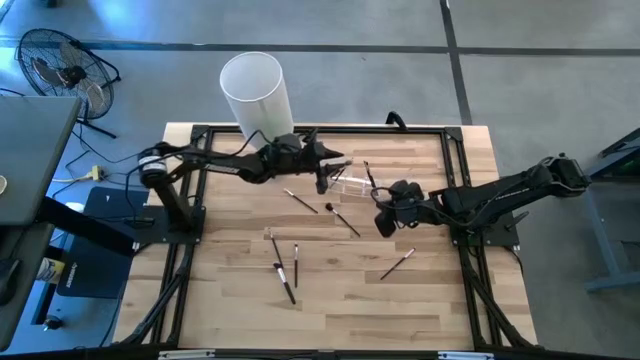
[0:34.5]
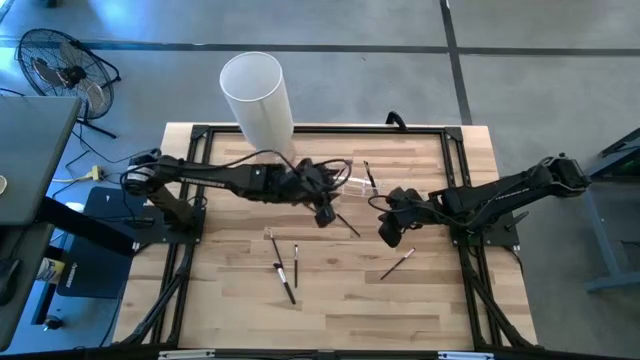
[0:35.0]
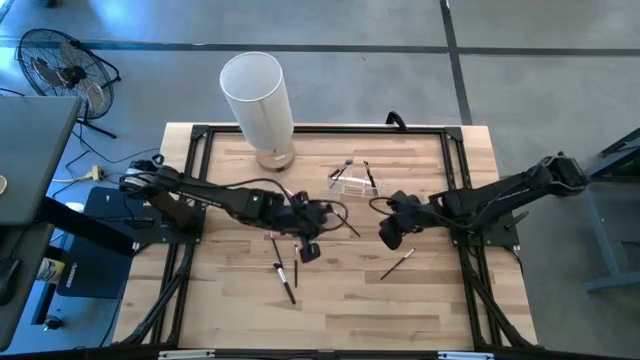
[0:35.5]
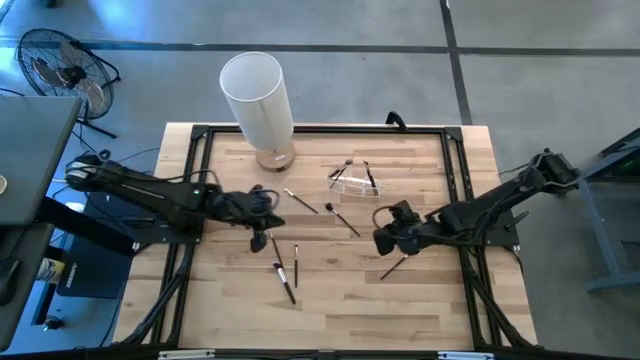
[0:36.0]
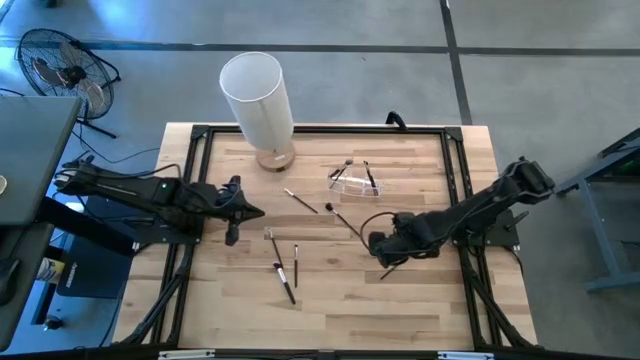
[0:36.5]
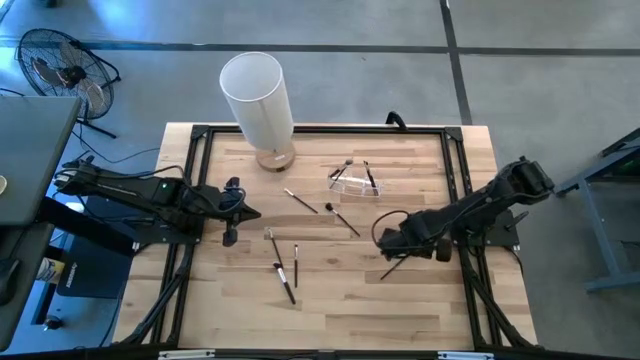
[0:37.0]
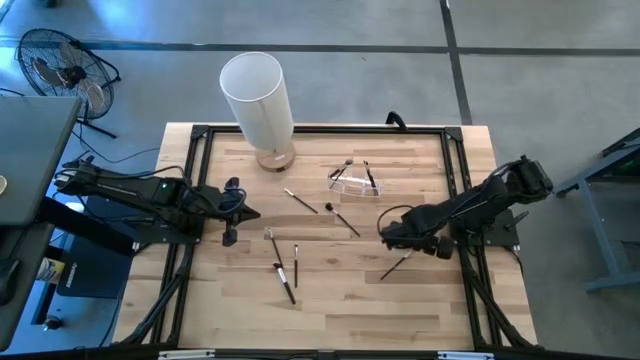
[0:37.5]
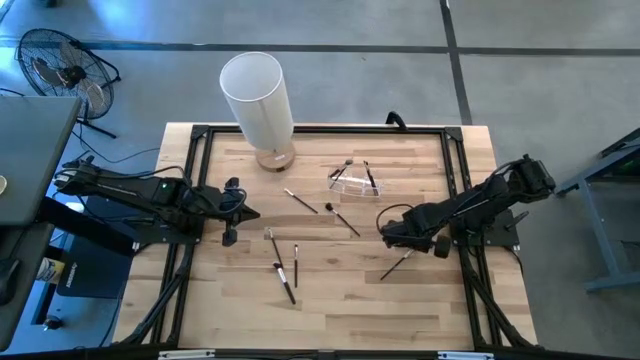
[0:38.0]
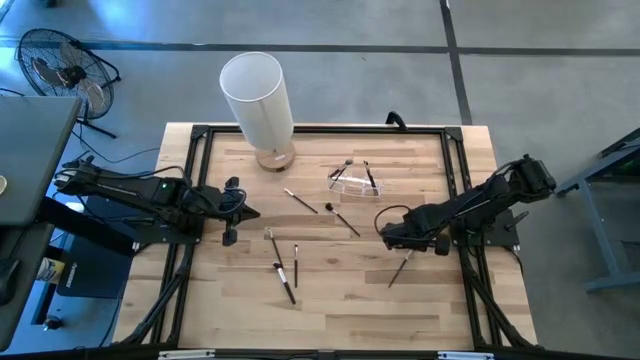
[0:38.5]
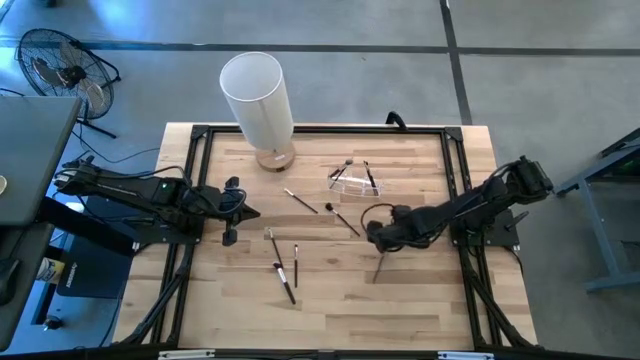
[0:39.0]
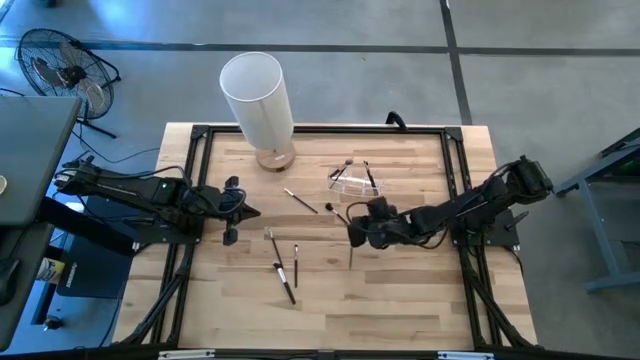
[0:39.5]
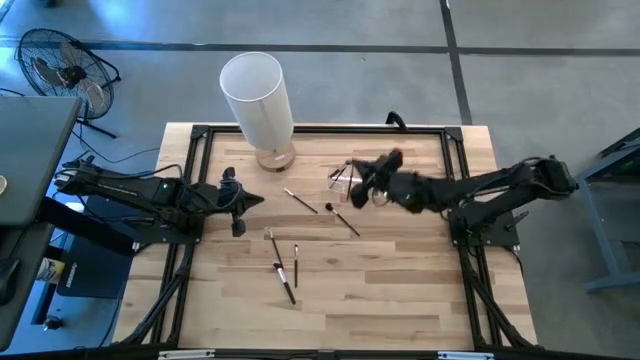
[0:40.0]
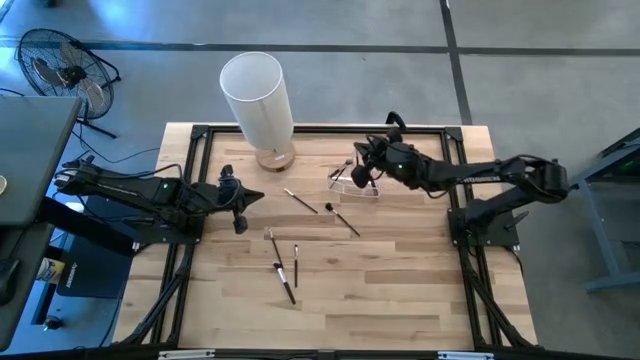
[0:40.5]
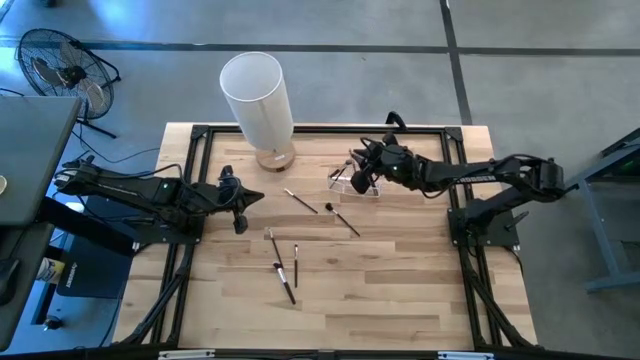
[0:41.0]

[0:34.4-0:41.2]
Task: Put items in baskets/containers
Put the black eyeshadow brush into the transparent organizer

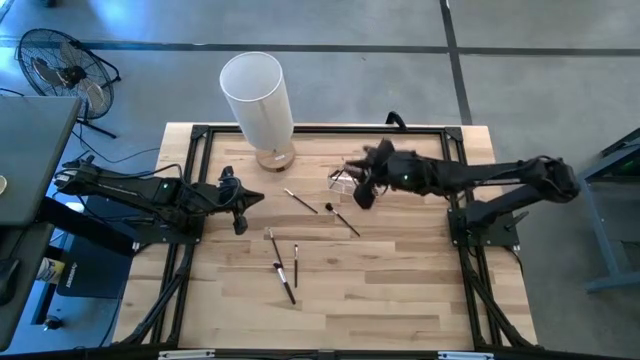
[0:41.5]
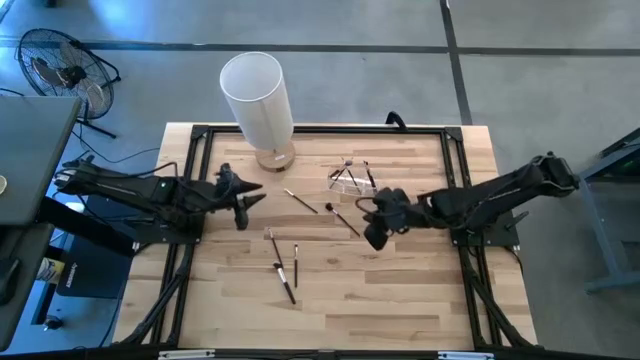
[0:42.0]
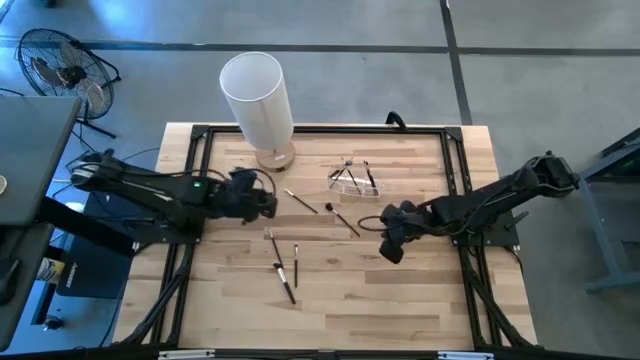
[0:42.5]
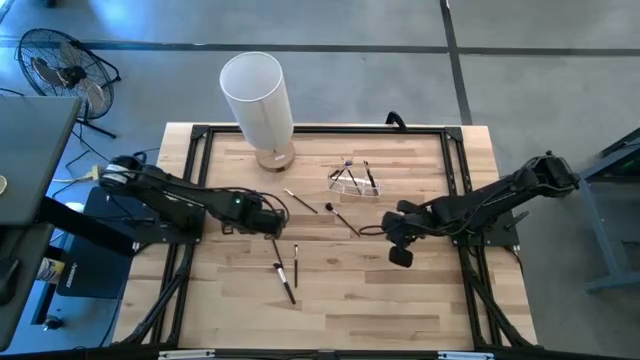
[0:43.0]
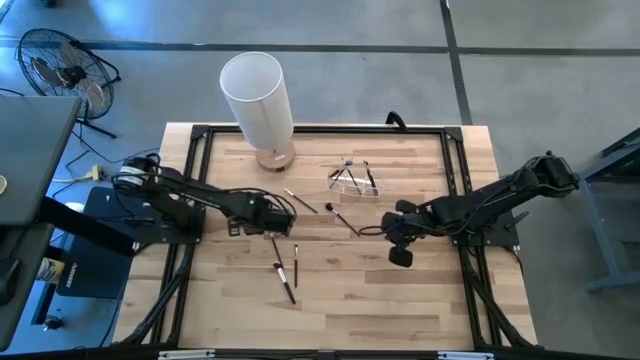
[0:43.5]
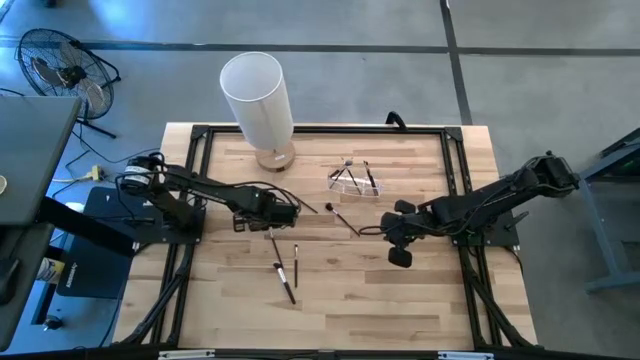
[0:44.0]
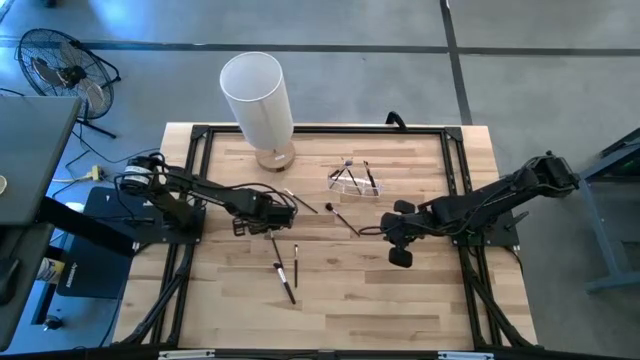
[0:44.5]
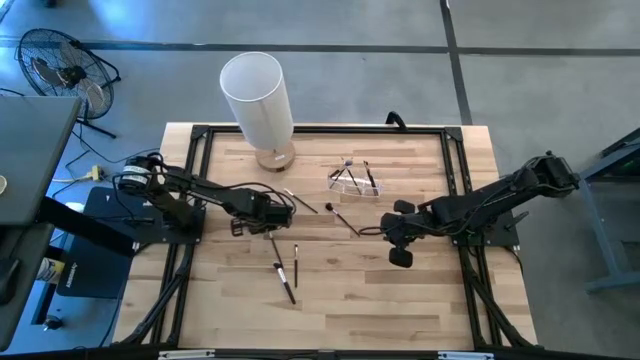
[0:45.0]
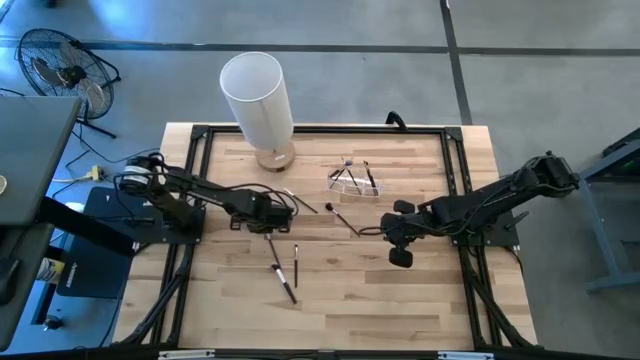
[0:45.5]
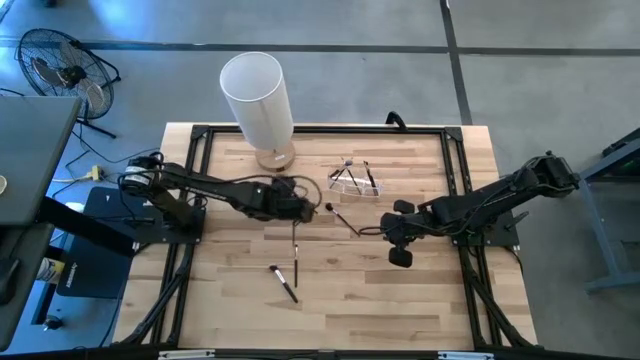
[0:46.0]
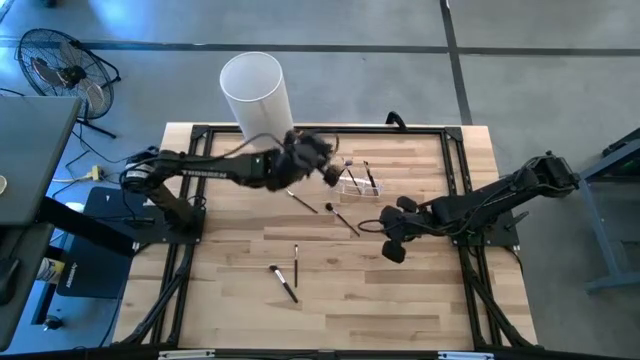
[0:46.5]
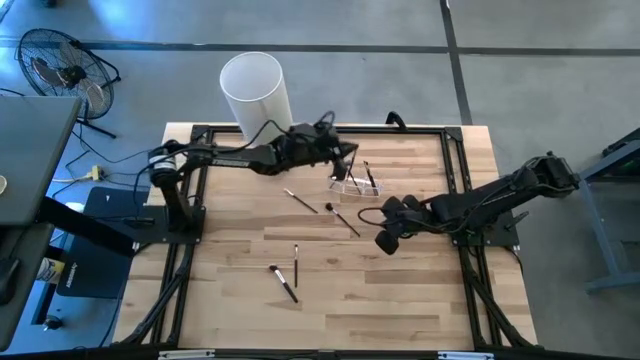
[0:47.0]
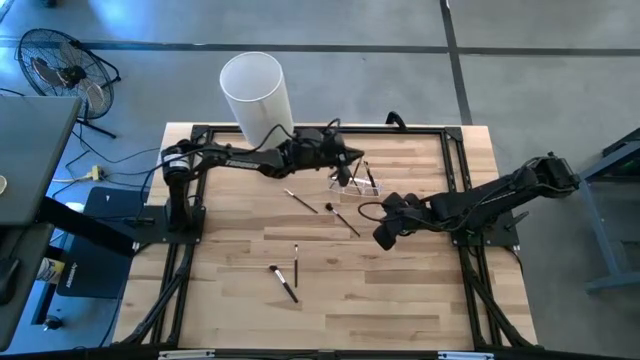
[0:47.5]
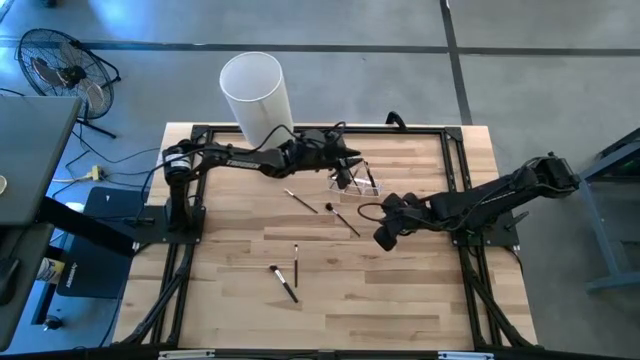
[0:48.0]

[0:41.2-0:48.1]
Put the black eyeshadow brush into the transparent organizer

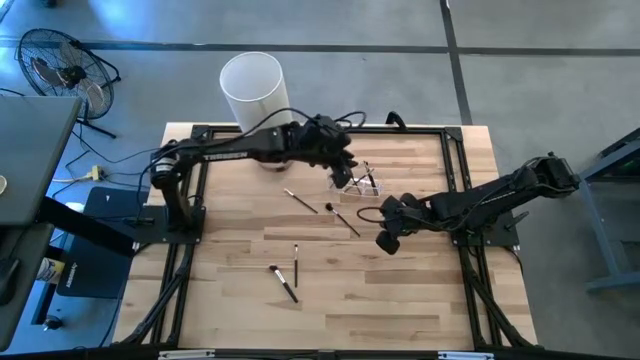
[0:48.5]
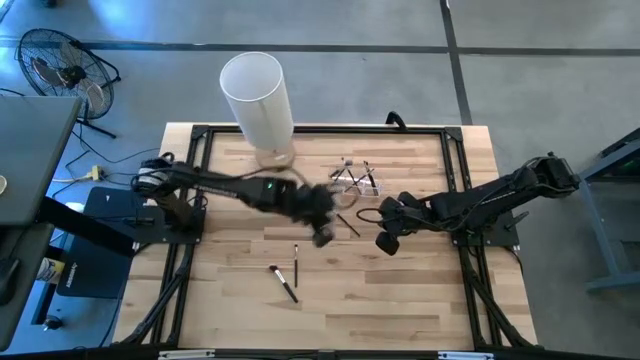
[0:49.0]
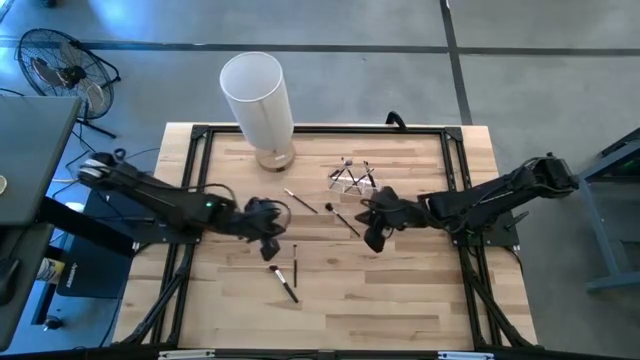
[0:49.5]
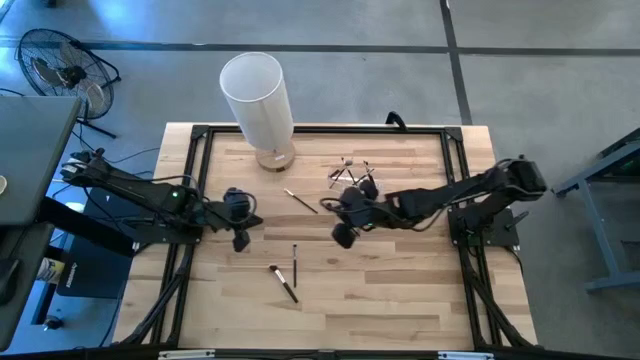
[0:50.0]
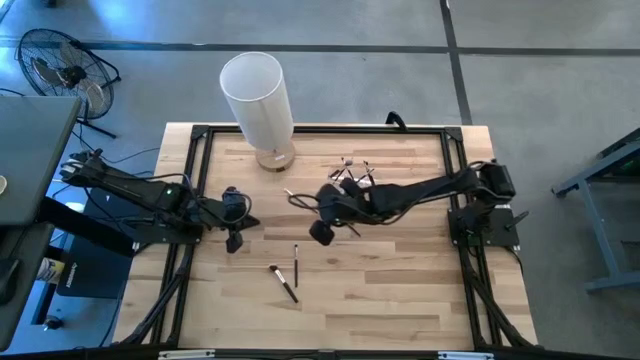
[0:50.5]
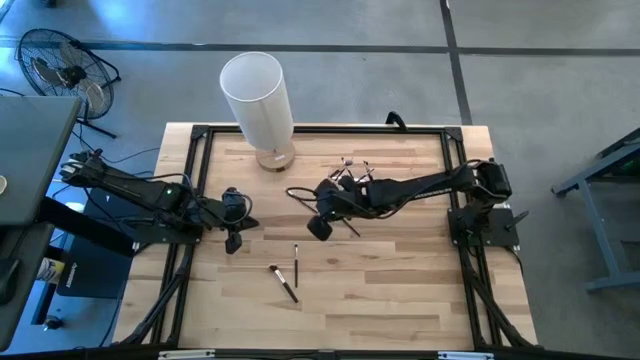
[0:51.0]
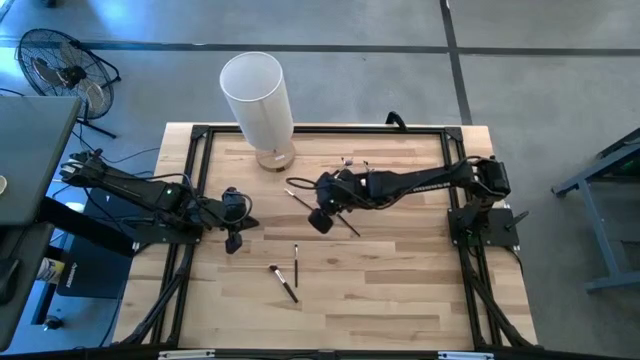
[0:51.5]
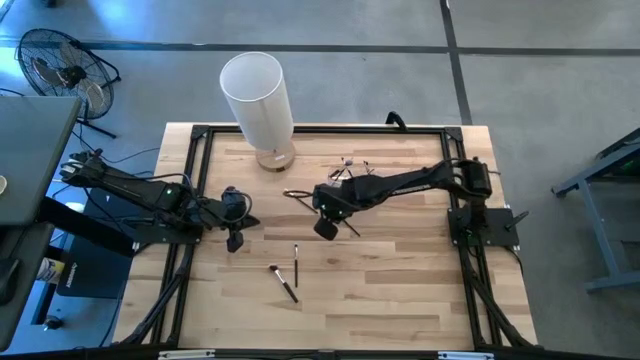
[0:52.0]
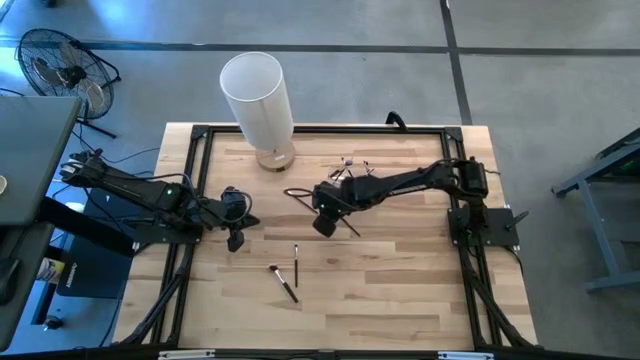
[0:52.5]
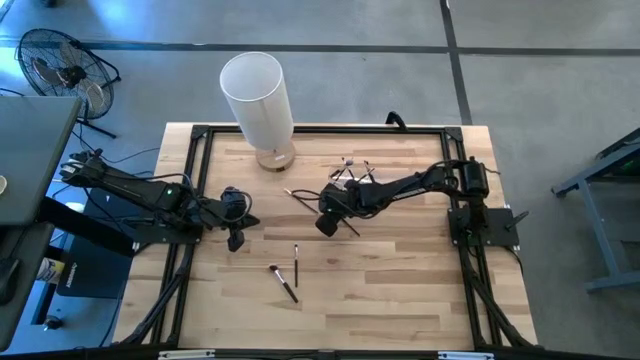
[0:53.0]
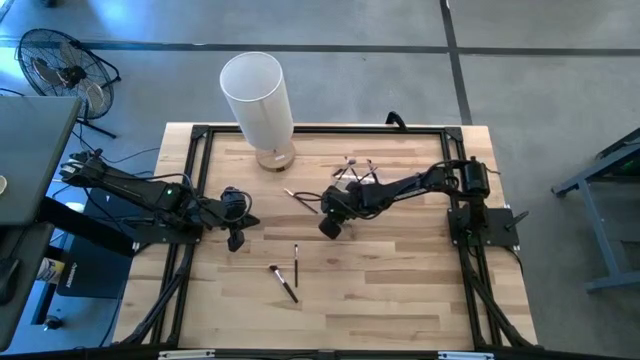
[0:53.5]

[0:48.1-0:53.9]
Put the black eye groomer brush into the transparent organizer

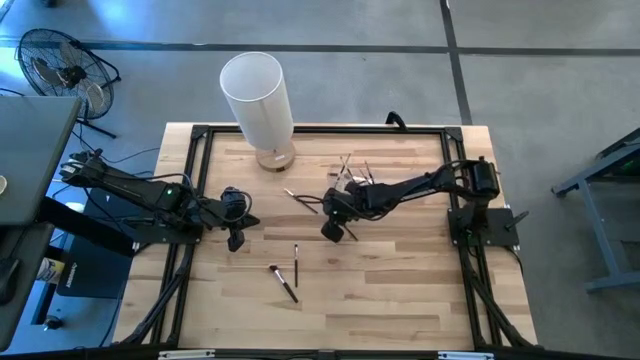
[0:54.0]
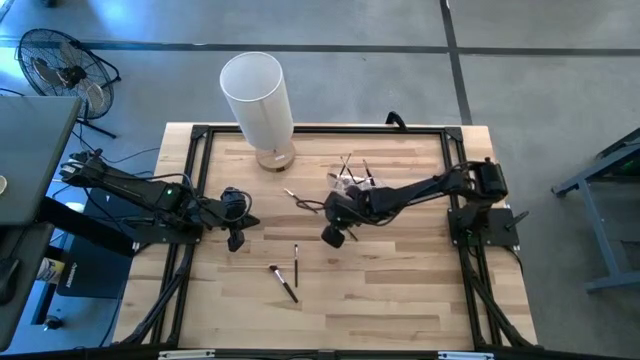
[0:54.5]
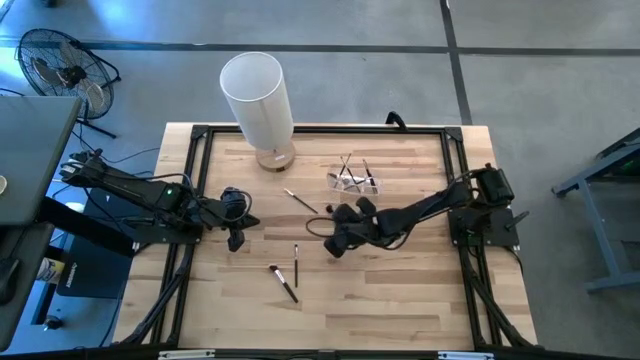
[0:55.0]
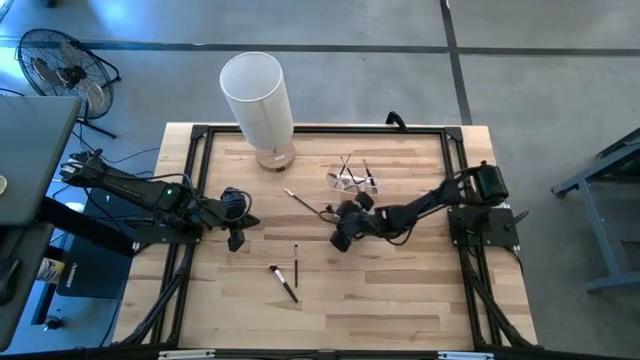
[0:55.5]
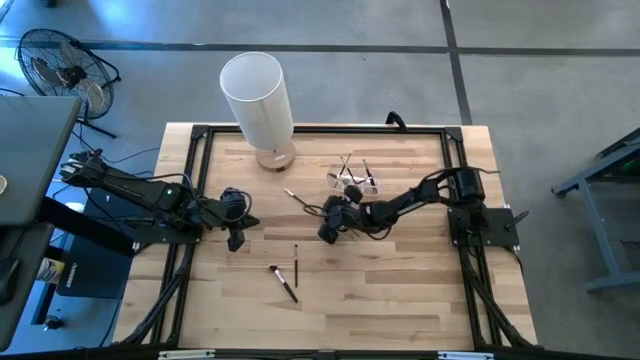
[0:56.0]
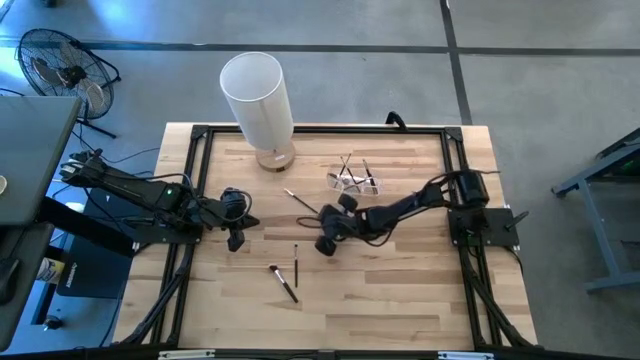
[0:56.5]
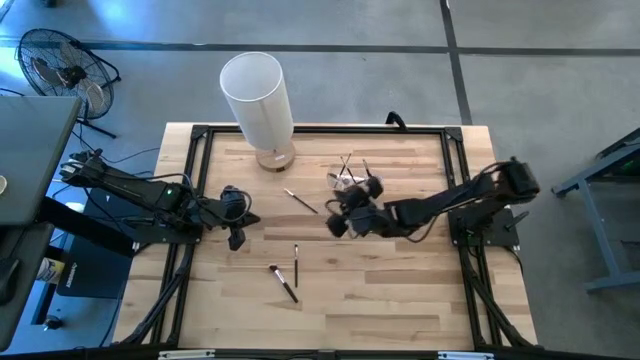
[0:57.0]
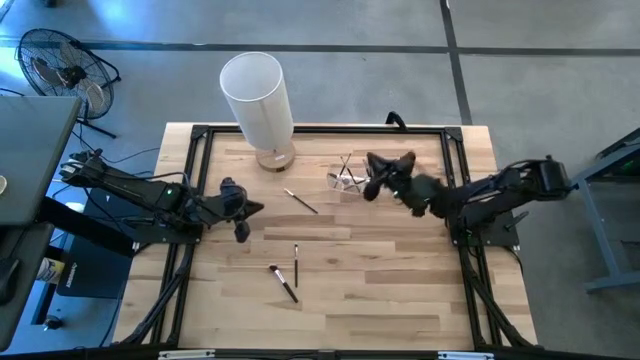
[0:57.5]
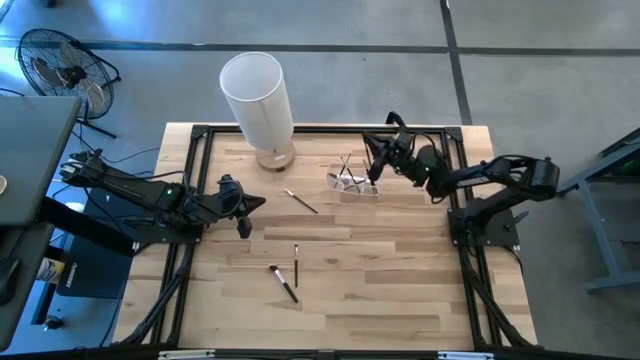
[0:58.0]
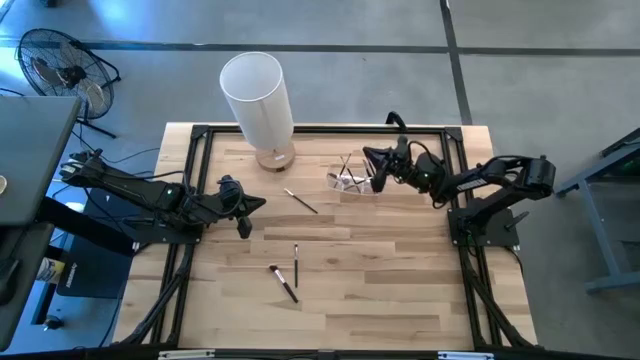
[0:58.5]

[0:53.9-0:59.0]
Put the black eye groomer brush into the transparent organizer
